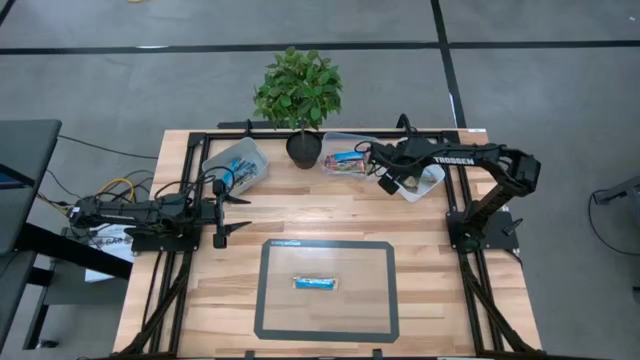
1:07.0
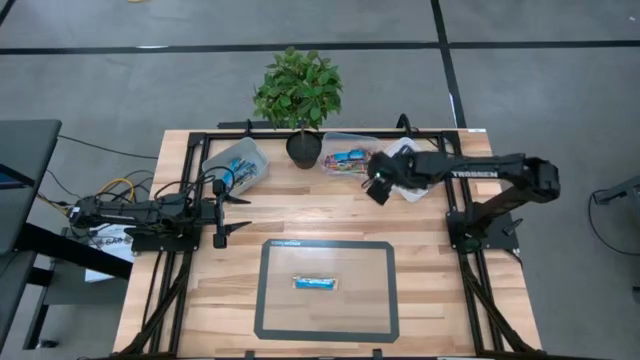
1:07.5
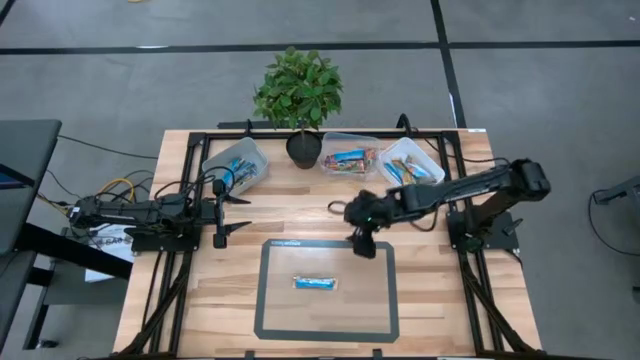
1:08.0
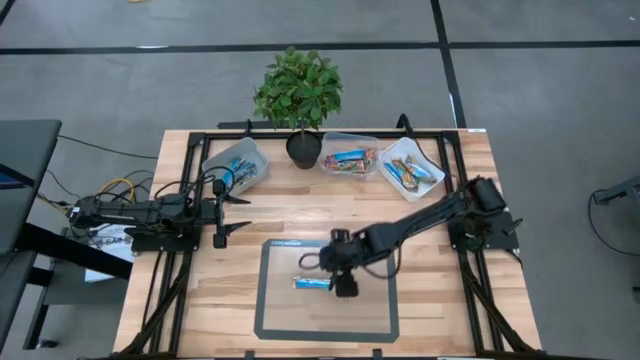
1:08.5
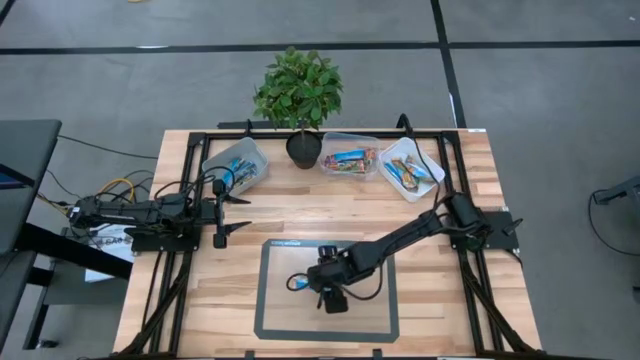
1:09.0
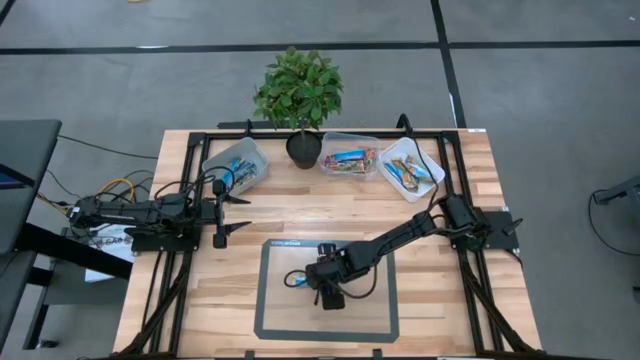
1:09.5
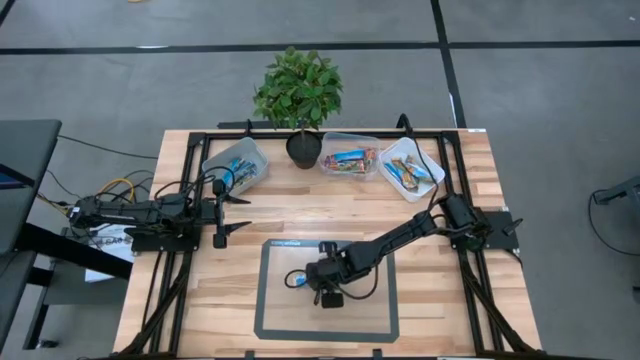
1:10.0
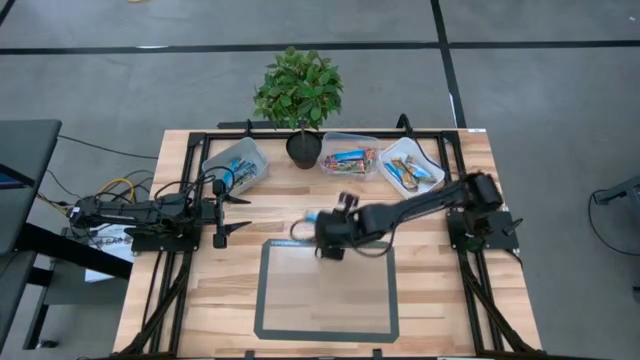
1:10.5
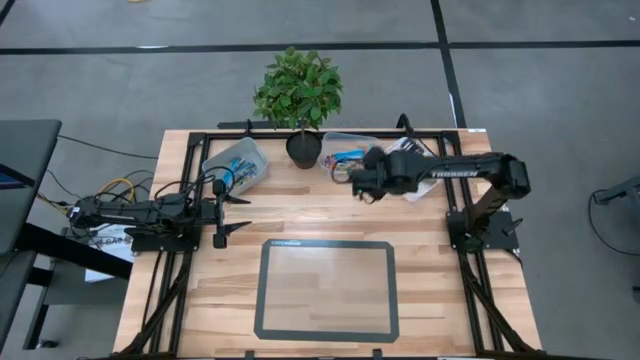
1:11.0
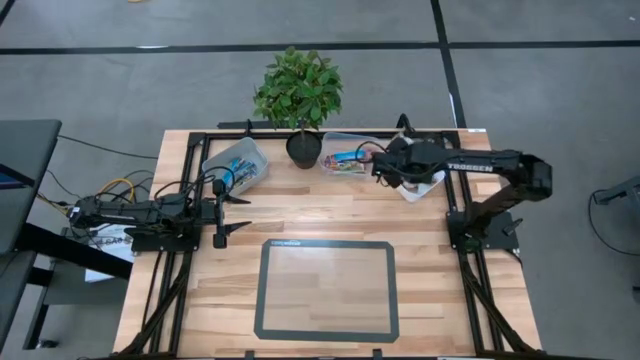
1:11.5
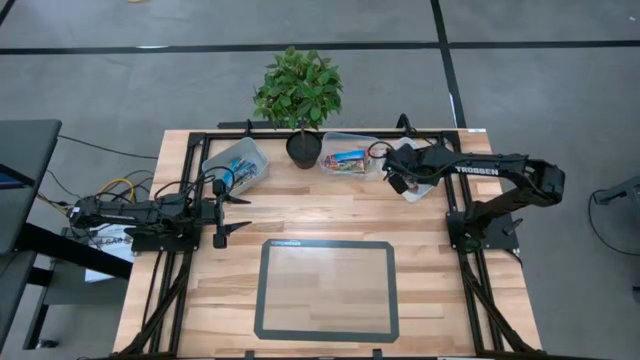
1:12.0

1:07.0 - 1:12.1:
Task: Pick and place Granola Bars by type
Put the yellow granola bar into the white bin

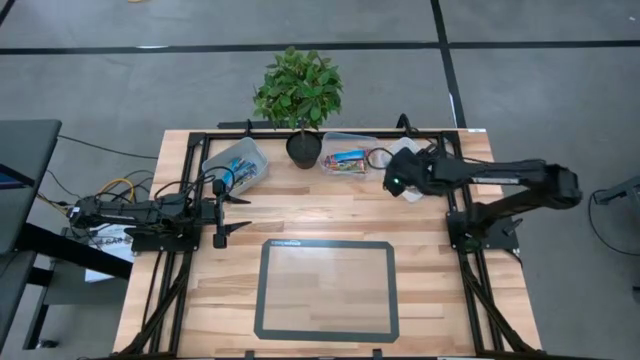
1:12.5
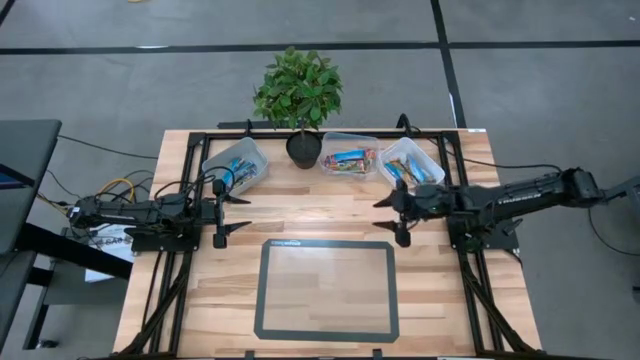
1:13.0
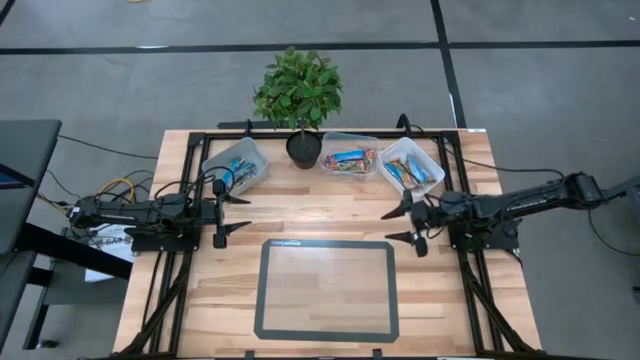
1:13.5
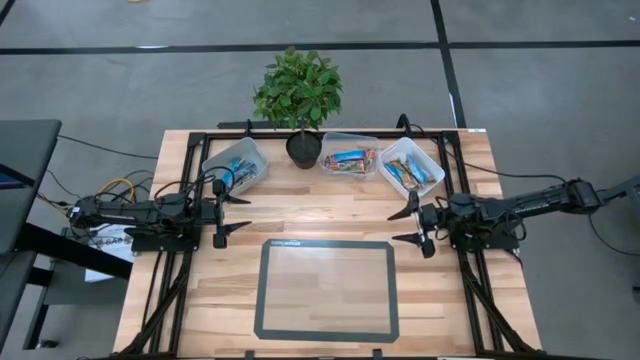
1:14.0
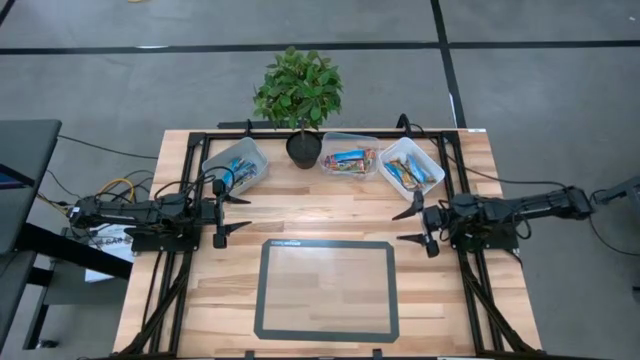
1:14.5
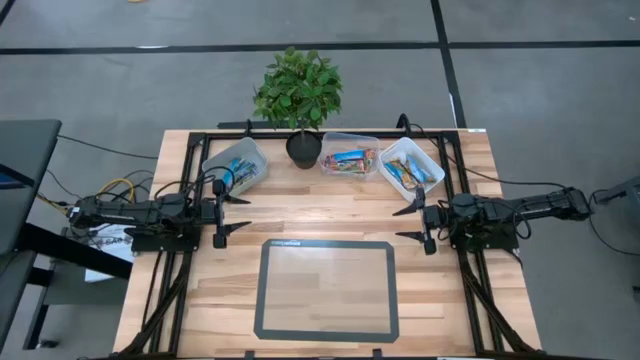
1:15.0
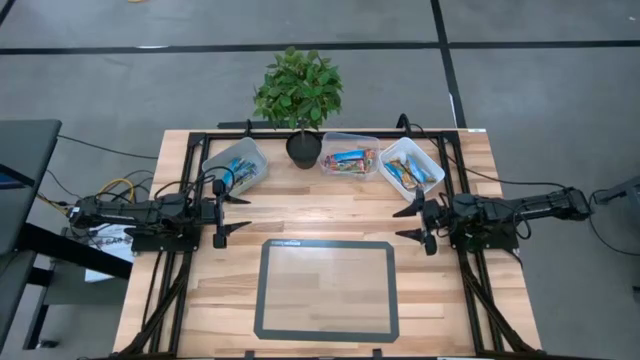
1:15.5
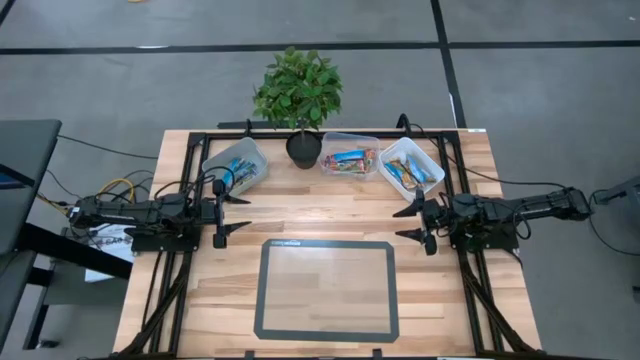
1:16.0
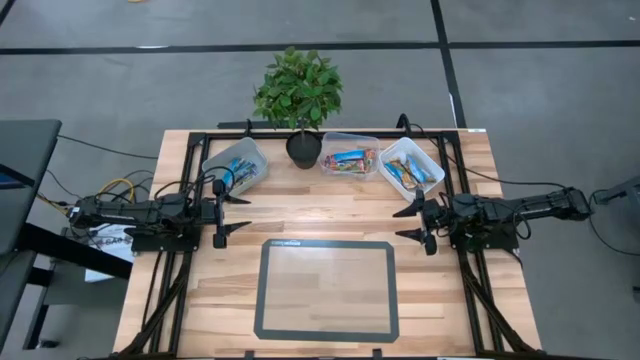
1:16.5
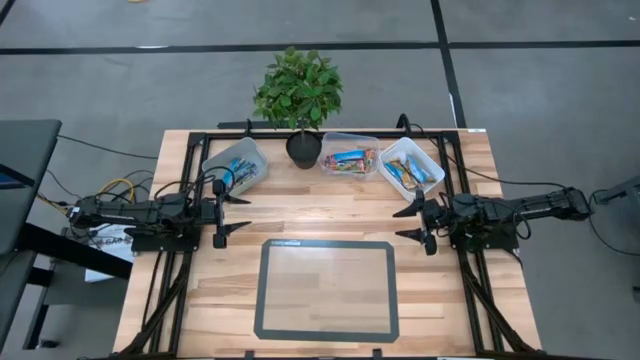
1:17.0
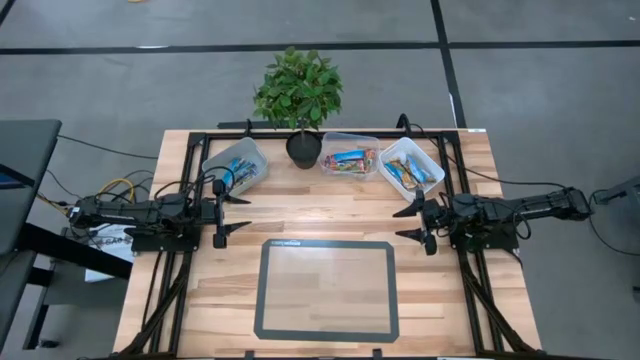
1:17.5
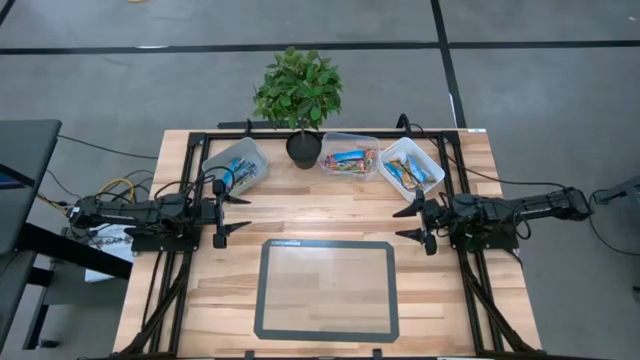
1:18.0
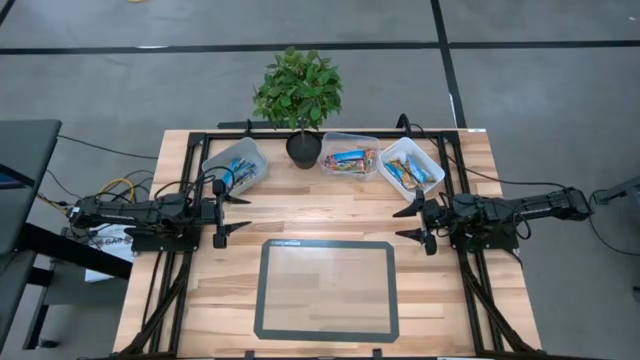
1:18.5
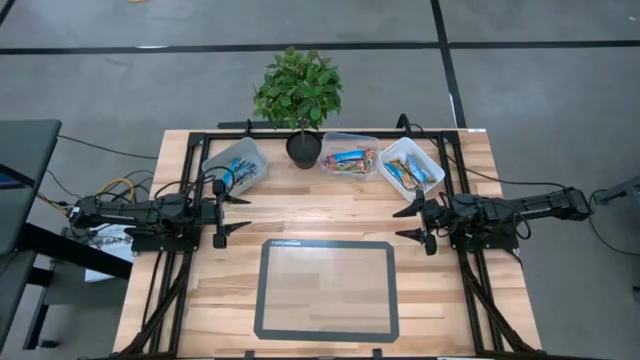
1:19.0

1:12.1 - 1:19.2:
Return to Home Position

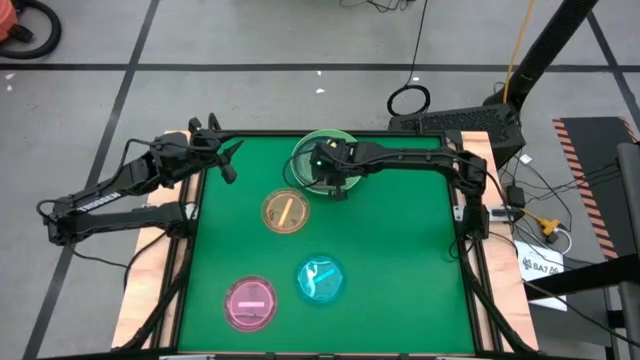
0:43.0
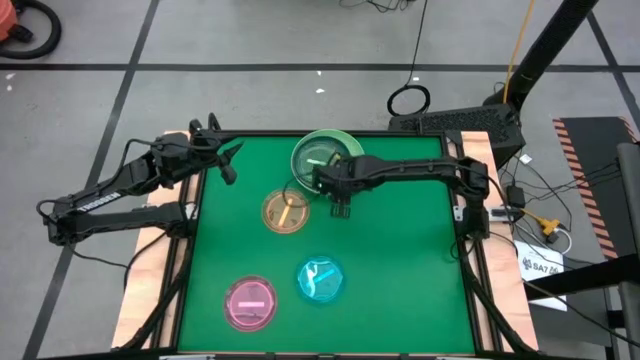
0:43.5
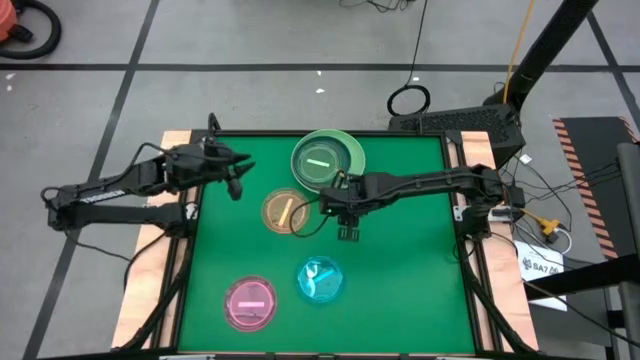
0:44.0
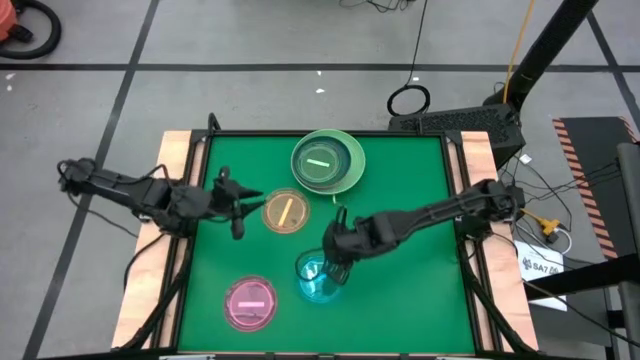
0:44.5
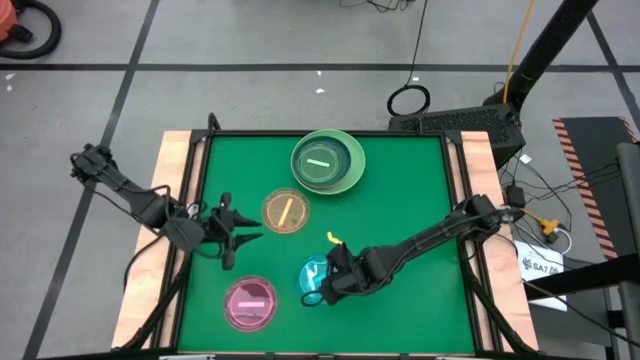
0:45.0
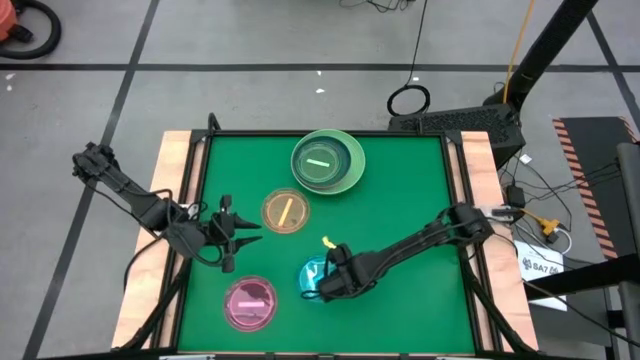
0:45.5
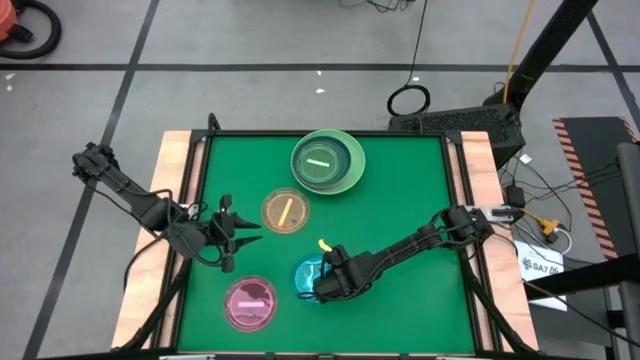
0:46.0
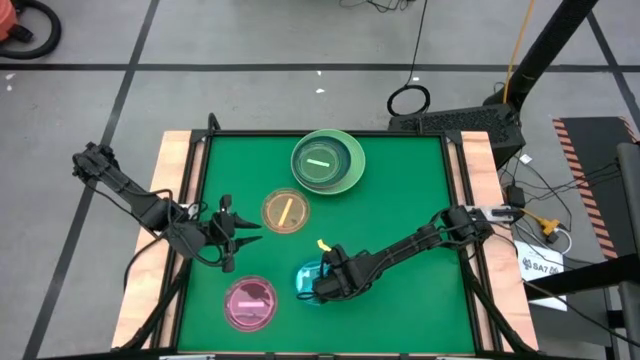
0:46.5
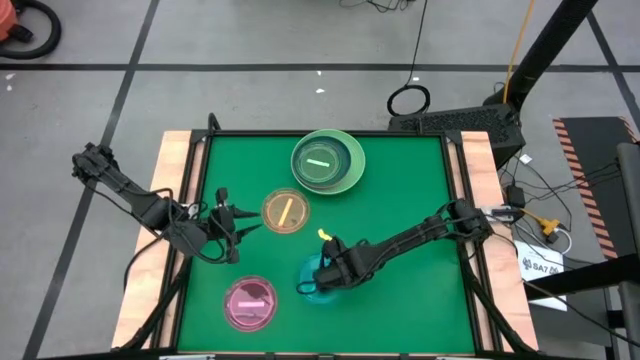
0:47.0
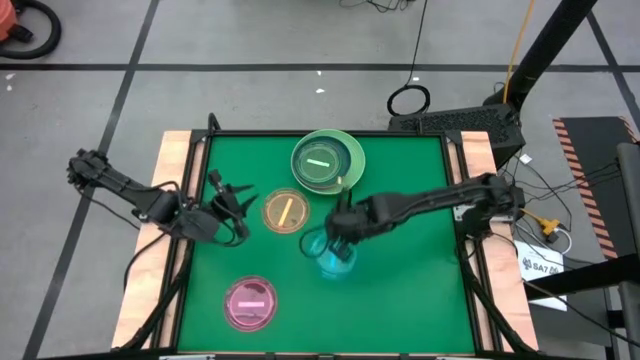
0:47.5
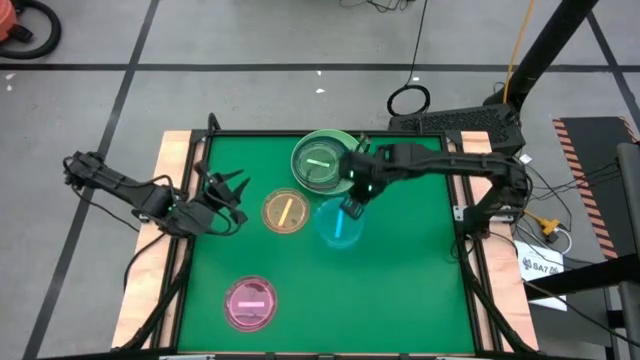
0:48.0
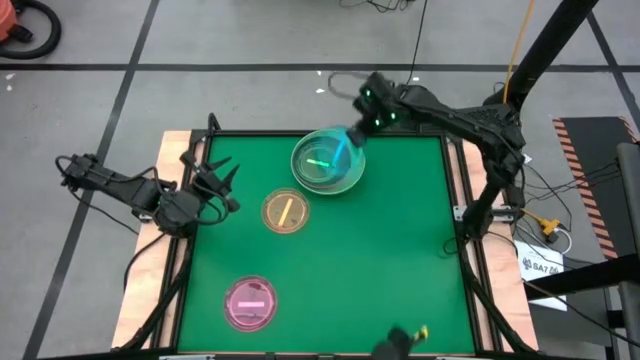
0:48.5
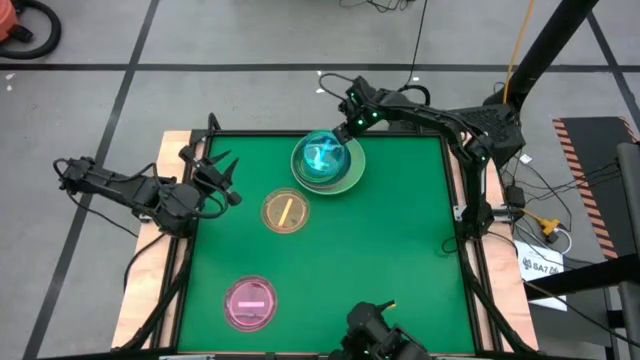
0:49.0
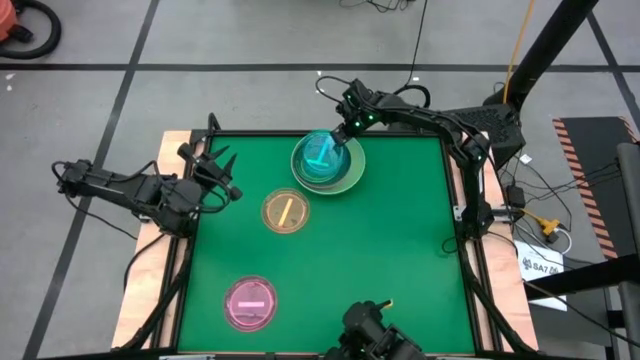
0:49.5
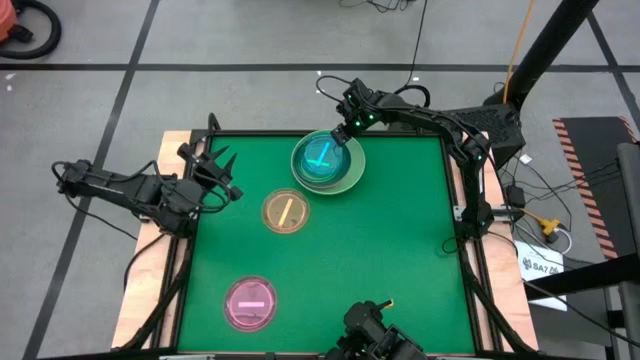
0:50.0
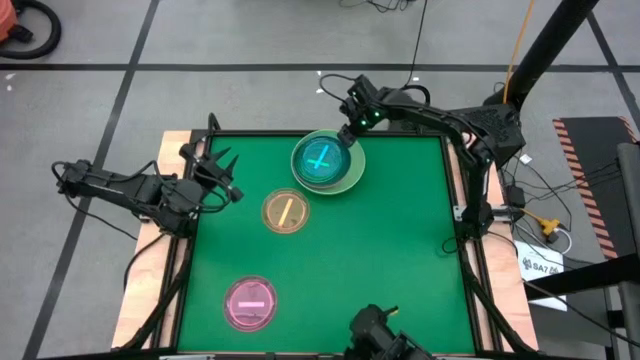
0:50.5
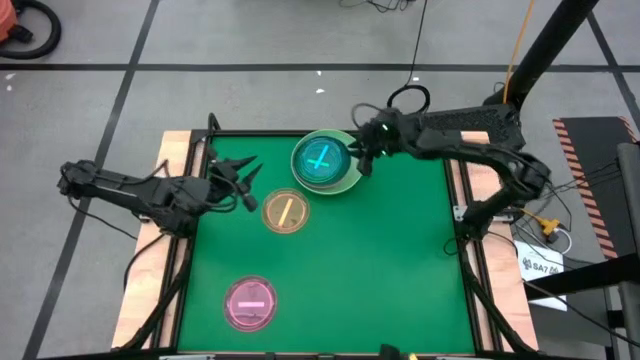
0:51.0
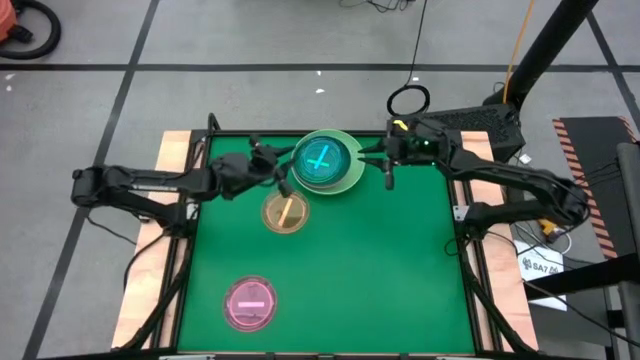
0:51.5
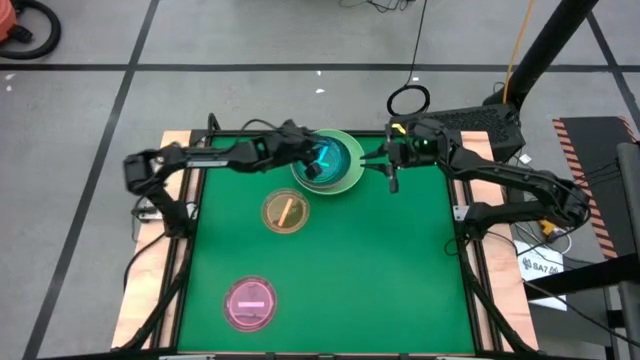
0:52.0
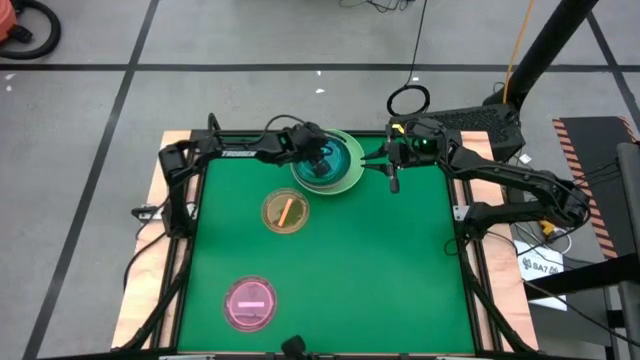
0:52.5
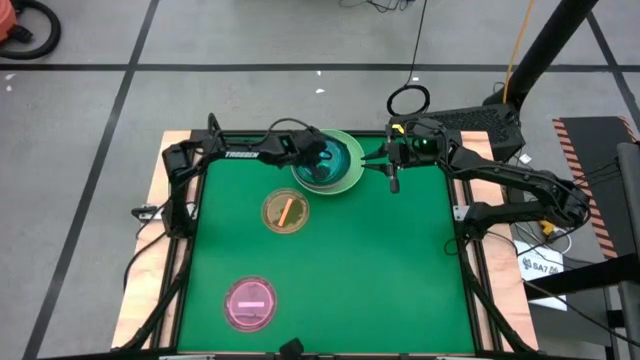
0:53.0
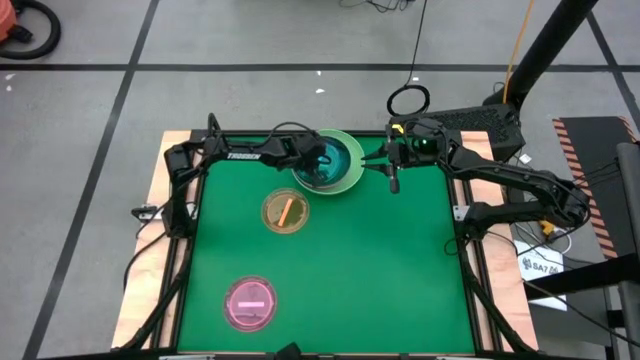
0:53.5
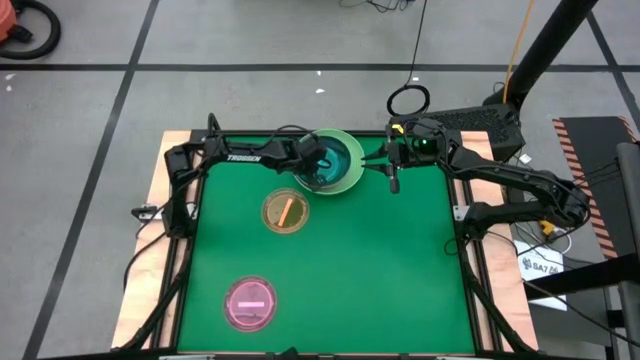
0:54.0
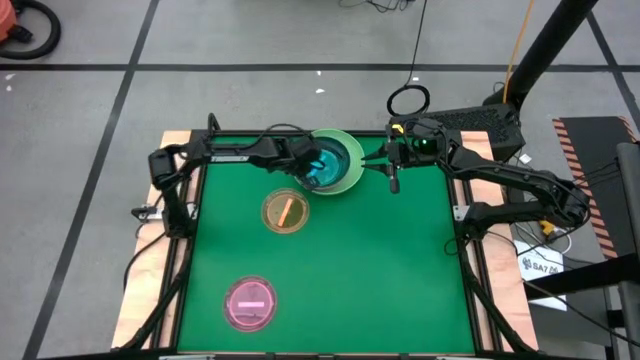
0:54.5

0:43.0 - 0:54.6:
Task: Stack plastic plates
Stack the blue transparent plate on top of the green transparent plate
